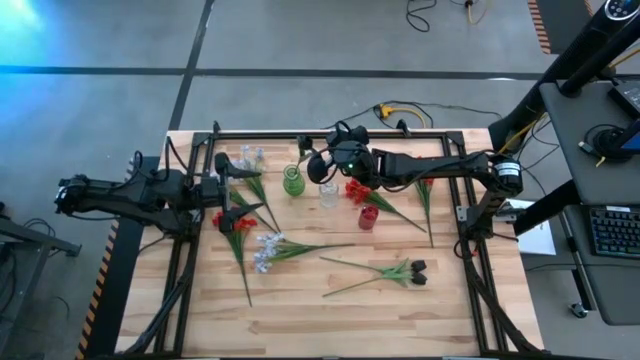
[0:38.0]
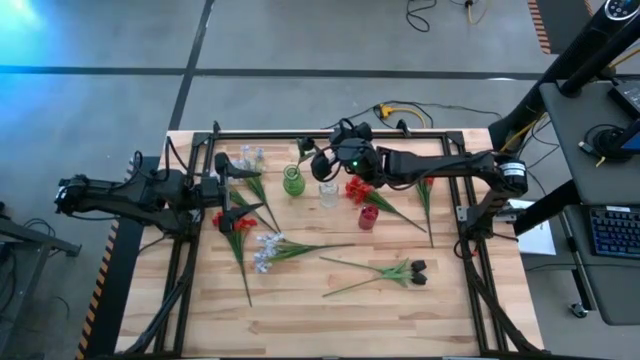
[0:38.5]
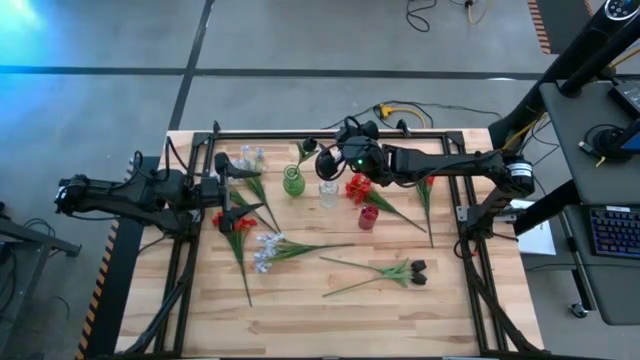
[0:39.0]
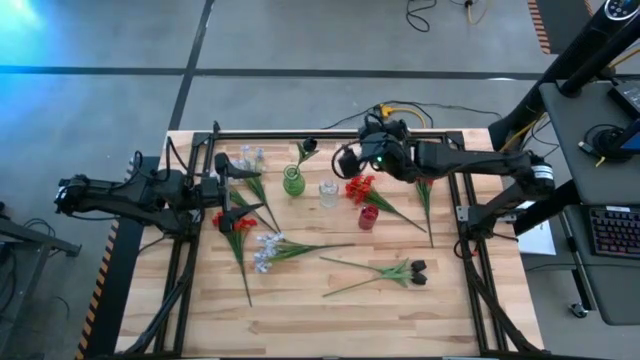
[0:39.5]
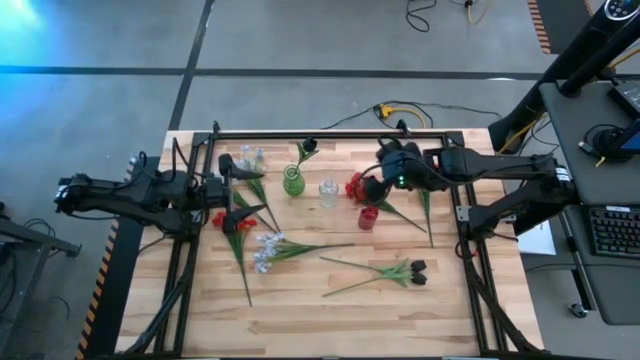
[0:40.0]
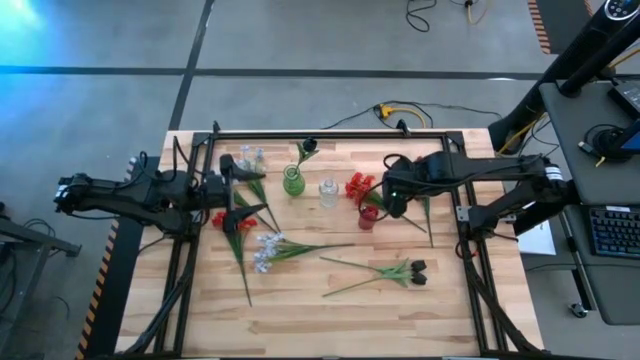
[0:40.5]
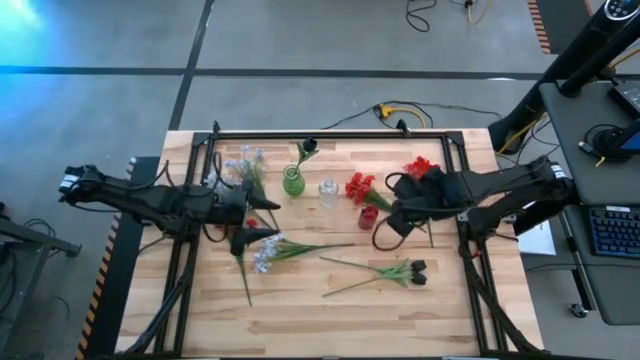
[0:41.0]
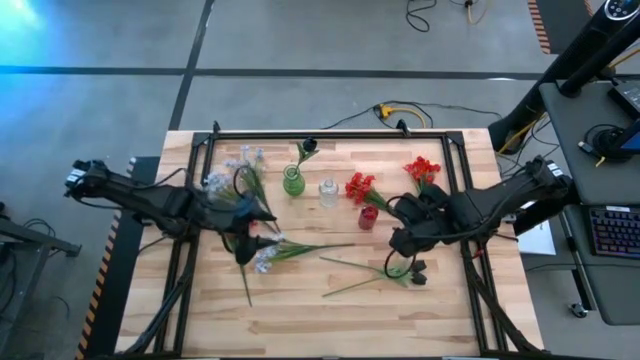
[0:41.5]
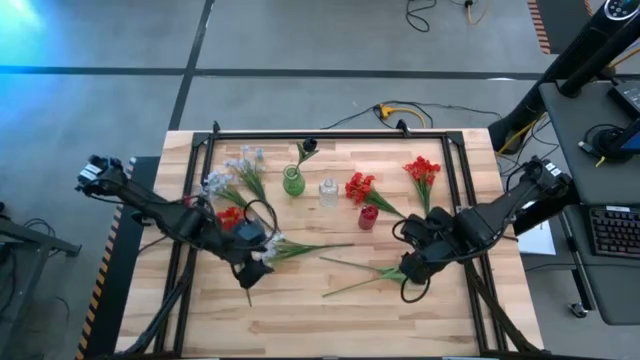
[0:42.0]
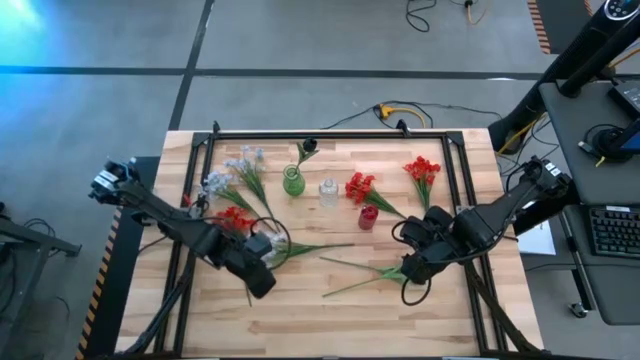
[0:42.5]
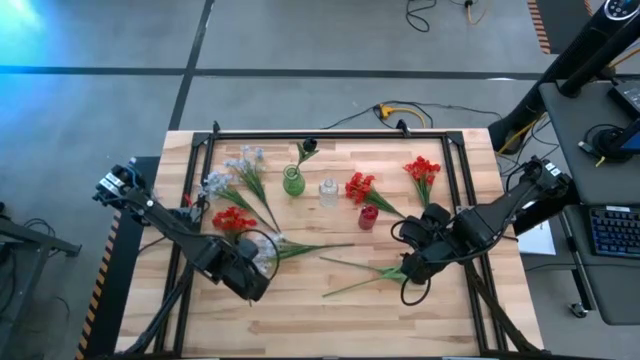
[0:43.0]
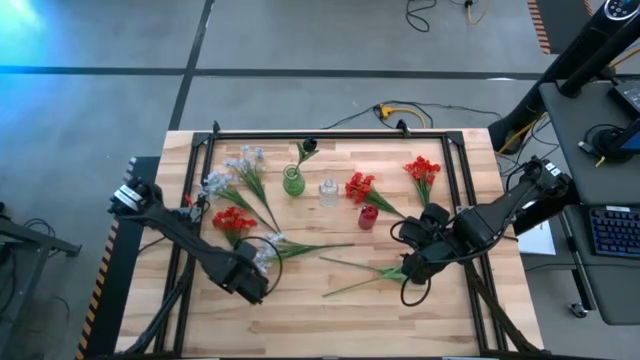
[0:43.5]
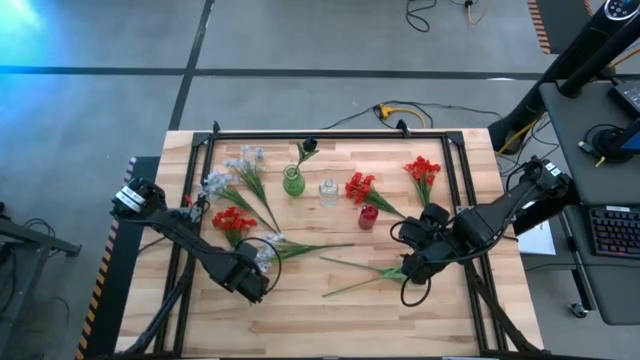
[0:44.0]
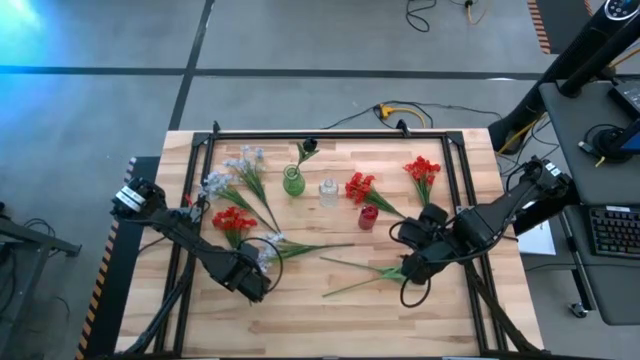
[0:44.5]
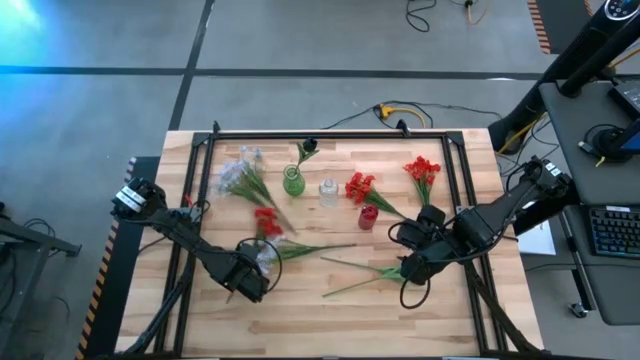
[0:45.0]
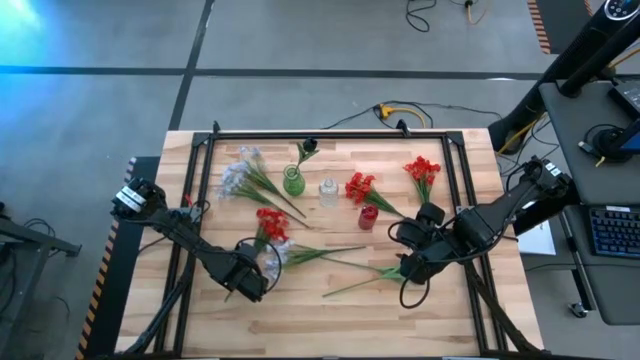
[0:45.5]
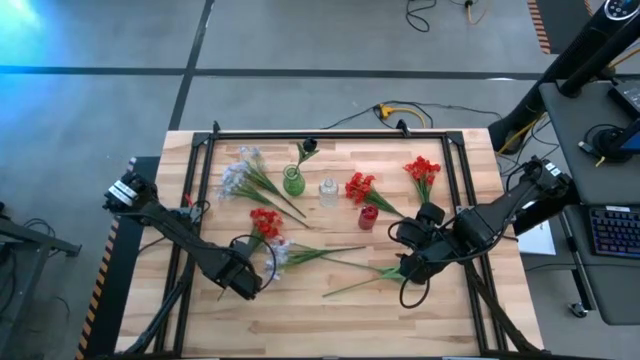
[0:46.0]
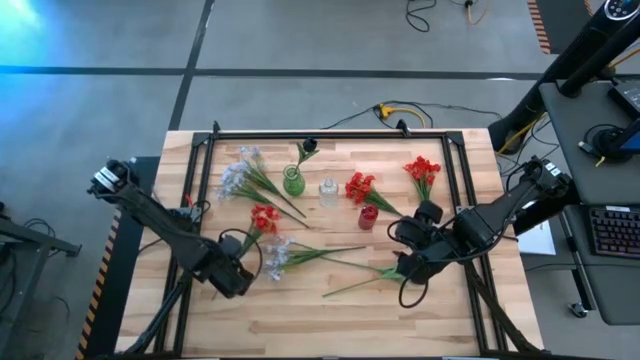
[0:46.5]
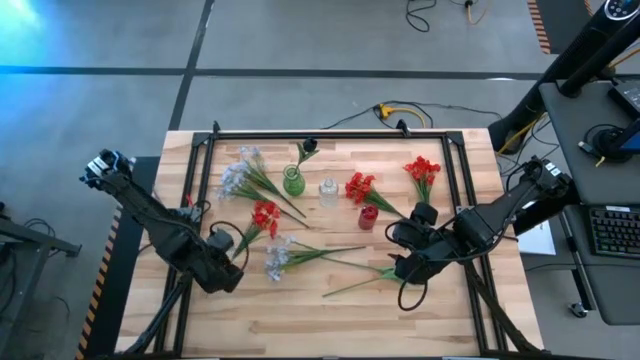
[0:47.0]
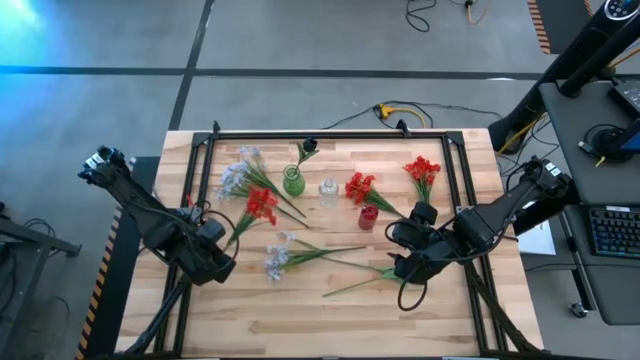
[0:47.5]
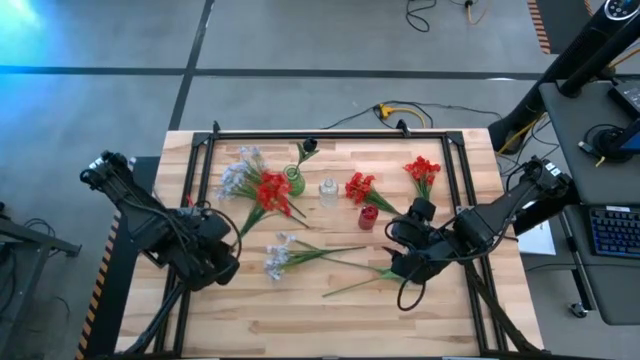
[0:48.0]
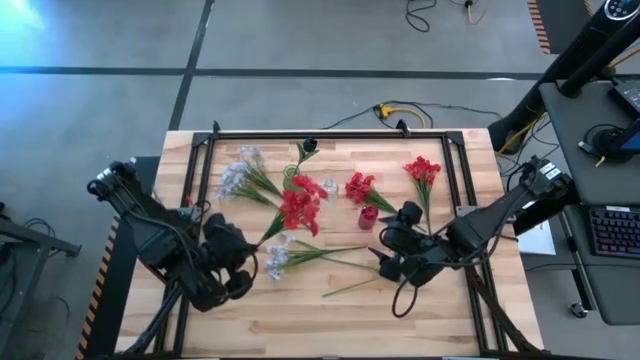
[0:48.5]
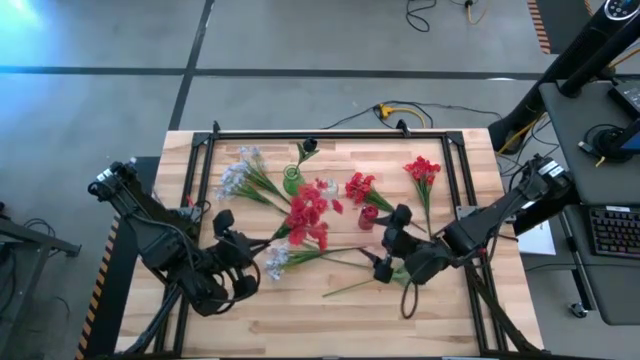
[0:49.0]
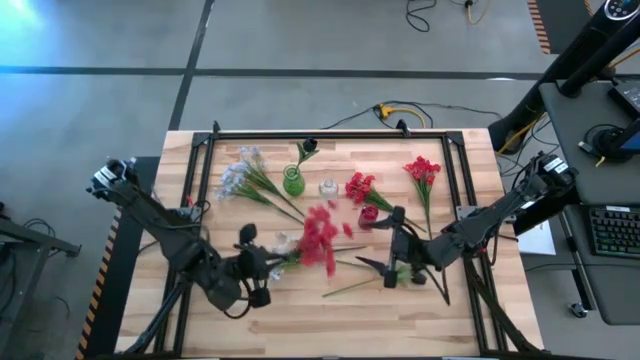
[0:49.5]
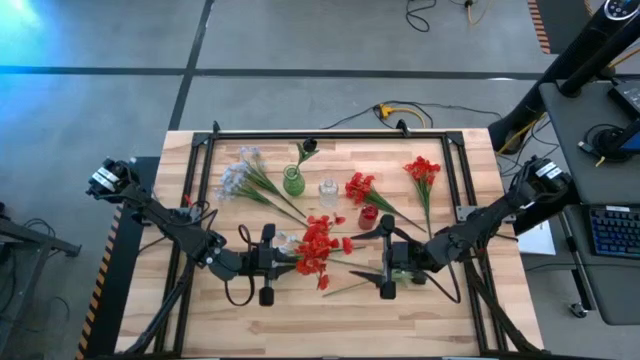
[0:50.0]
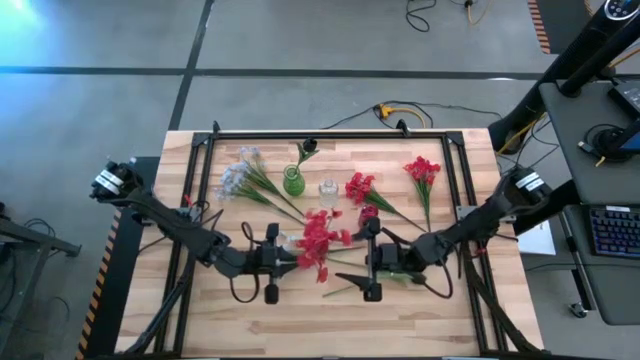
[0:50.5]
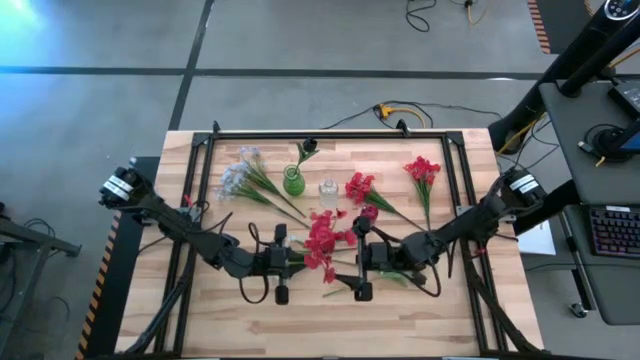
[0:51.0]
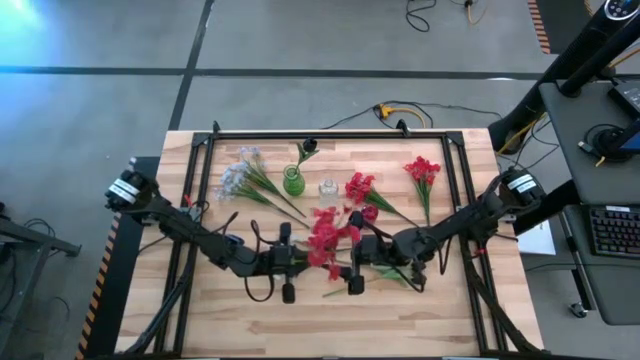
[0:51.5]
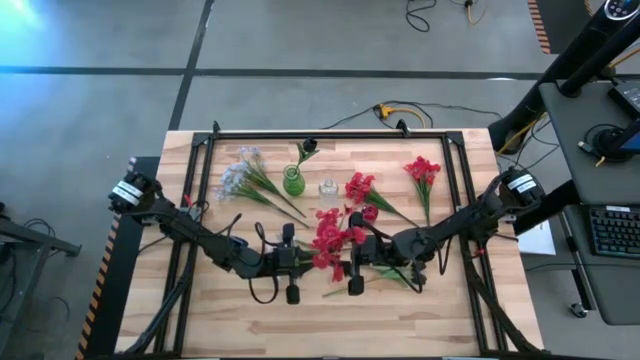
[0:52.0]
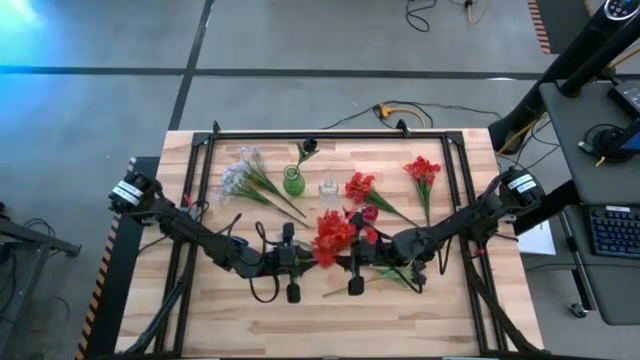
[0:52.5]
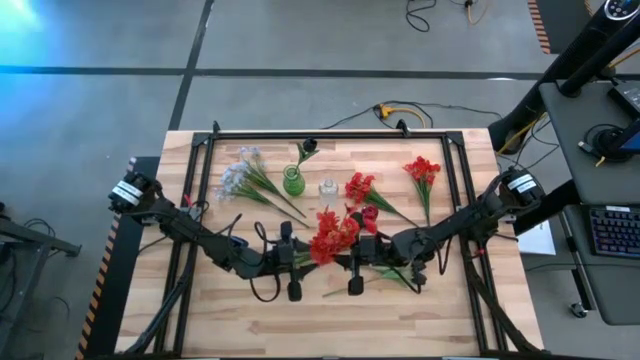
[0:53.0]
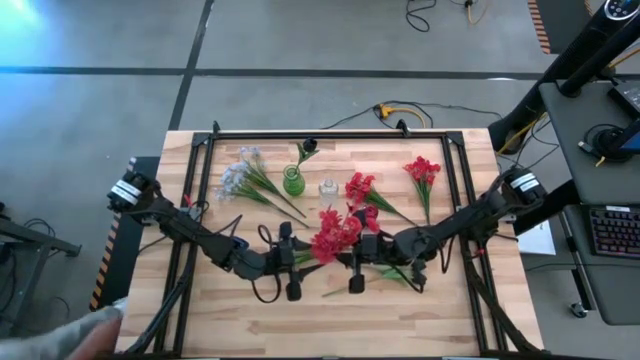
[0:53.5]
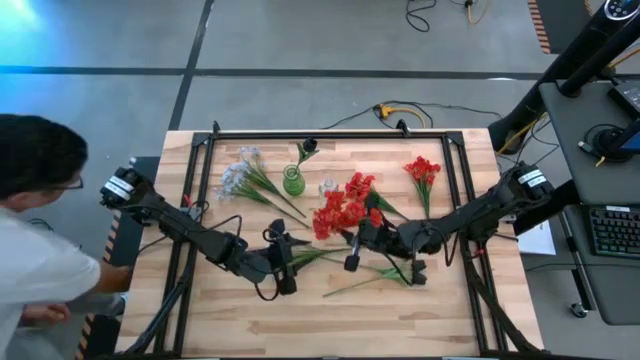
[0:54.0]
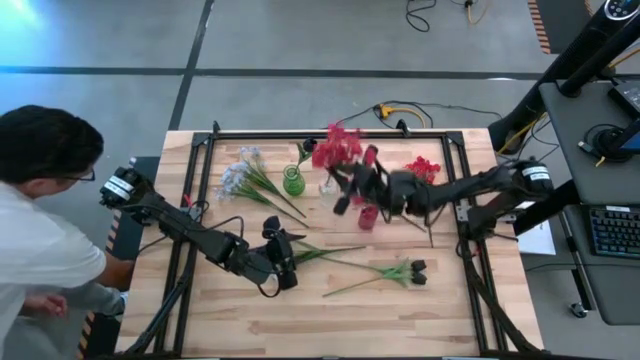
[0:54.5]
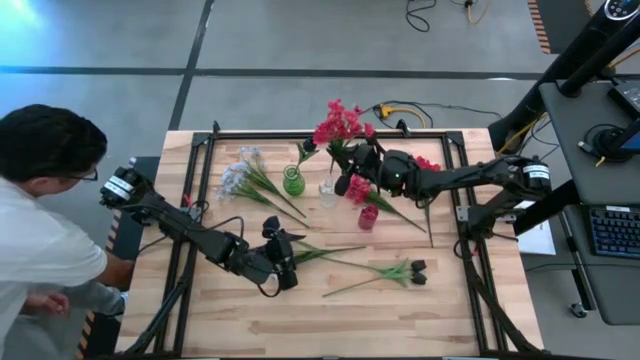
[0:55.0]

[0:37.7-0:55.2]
Task: Sort flowers into vase by color
Put the bottom left orange flowers into the transparent vase
